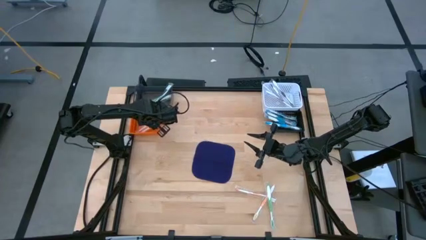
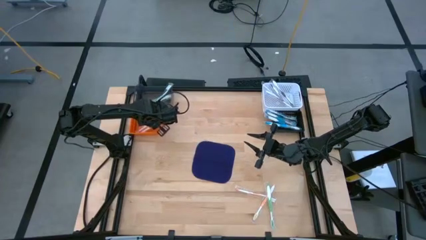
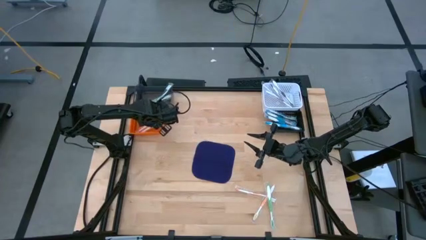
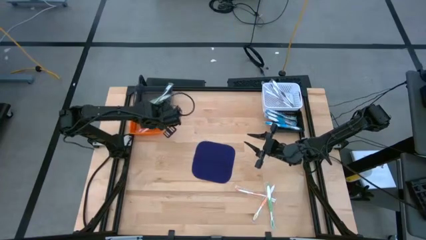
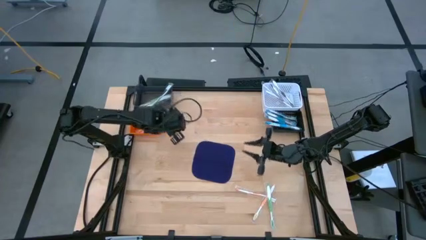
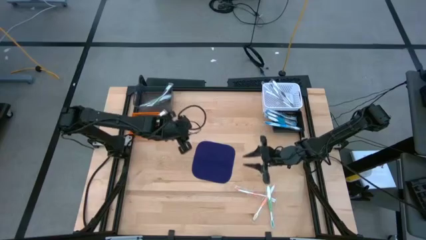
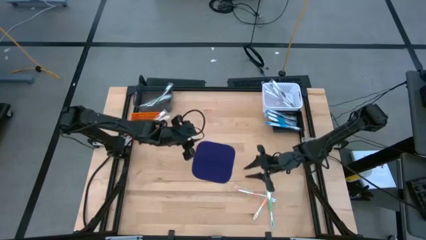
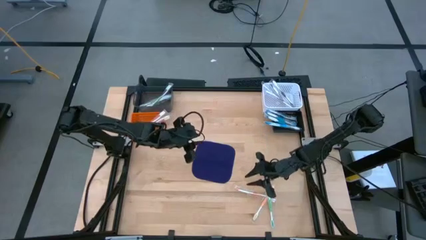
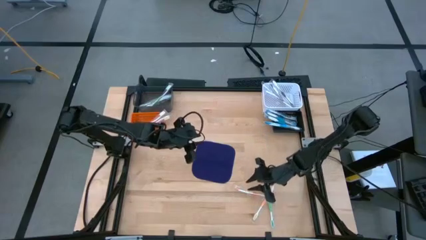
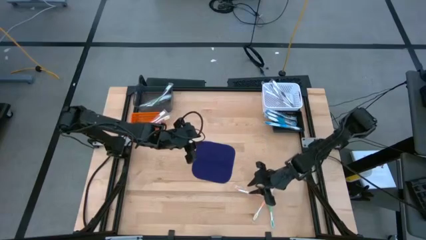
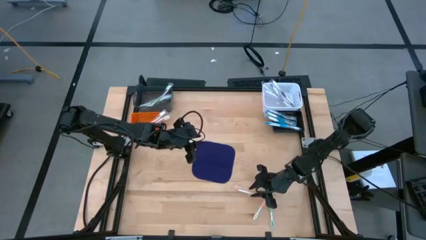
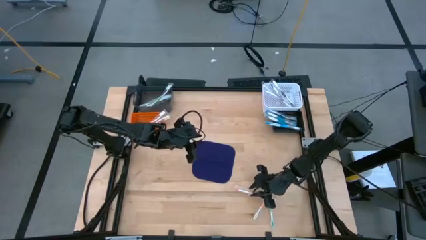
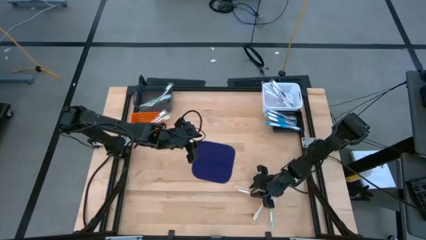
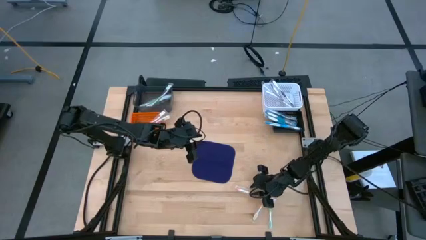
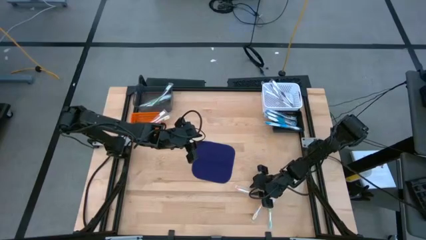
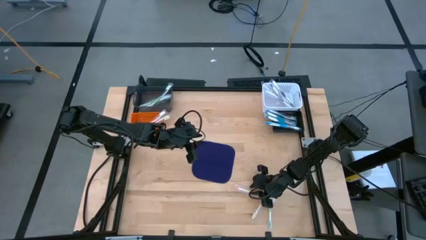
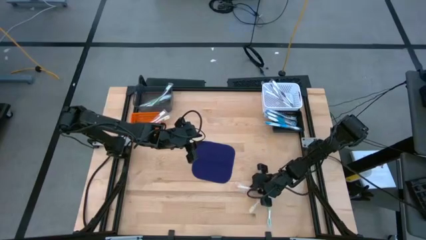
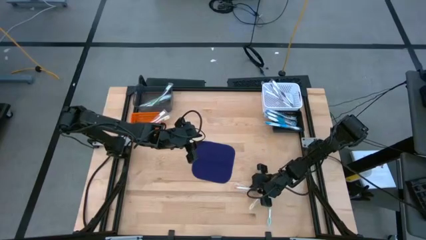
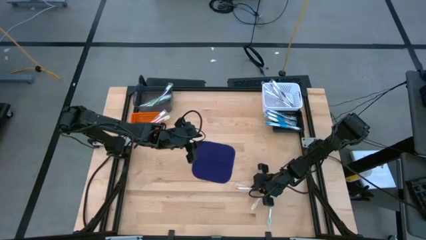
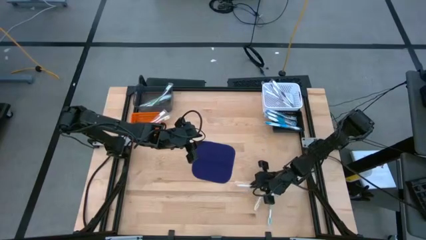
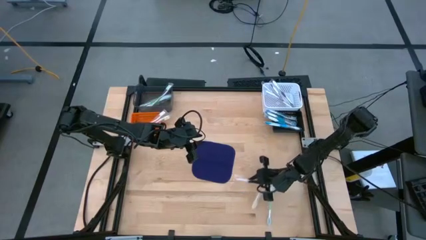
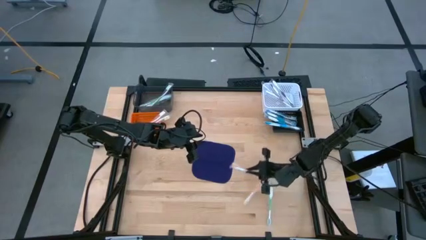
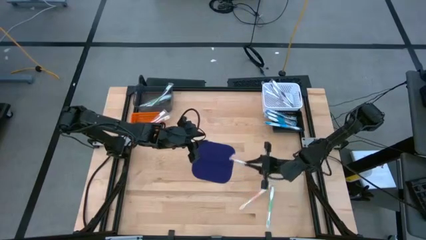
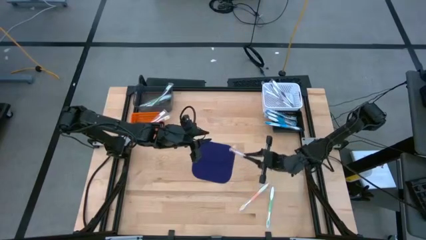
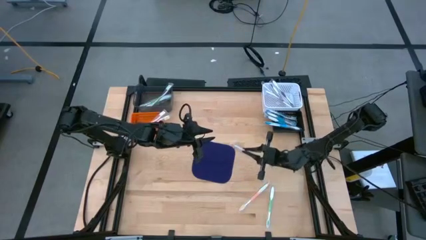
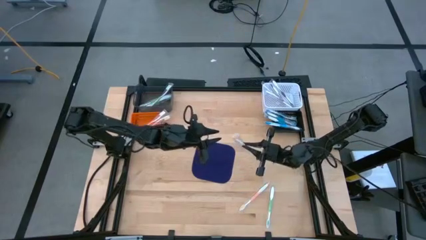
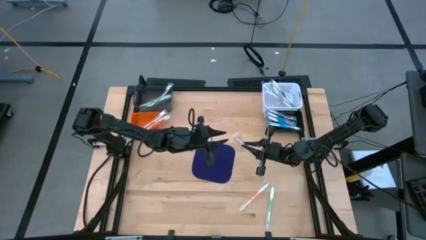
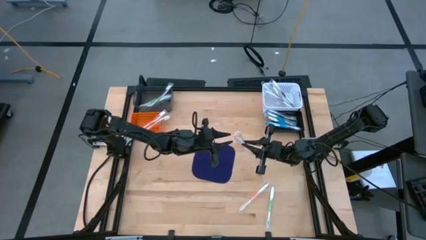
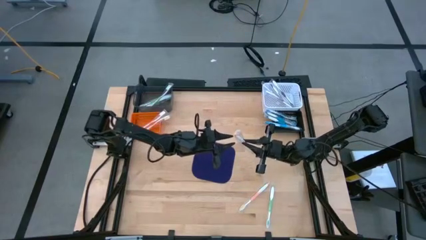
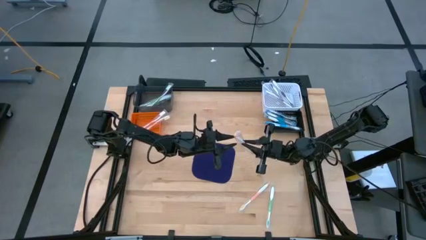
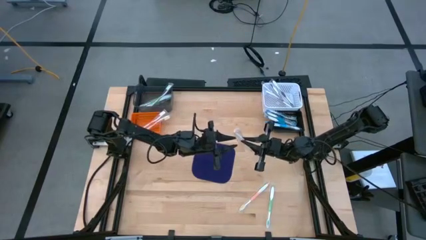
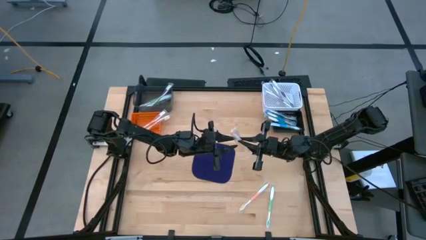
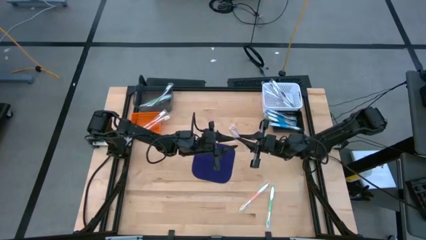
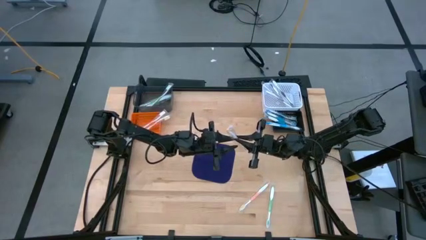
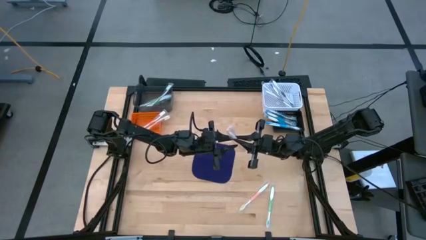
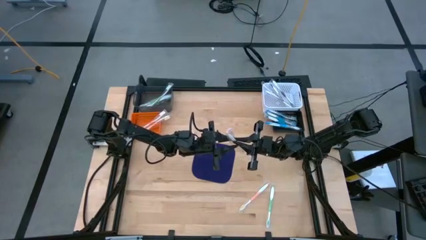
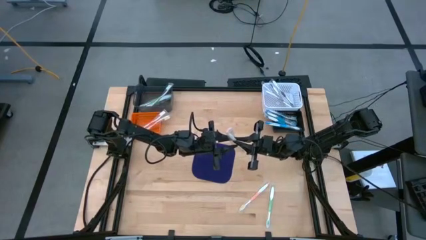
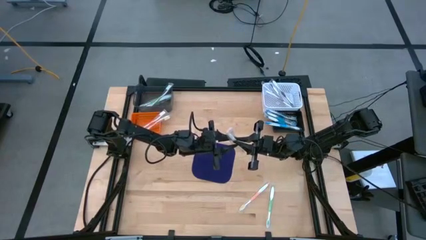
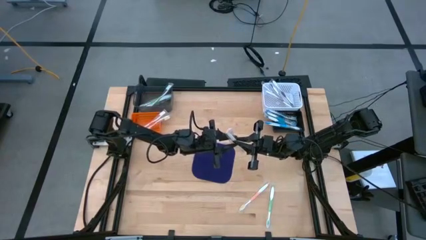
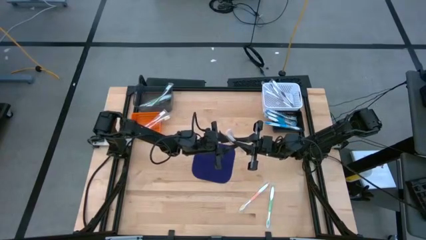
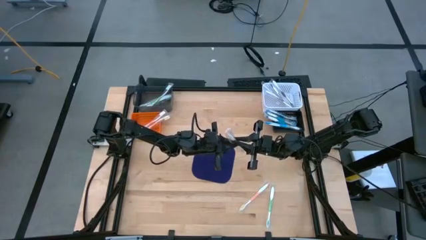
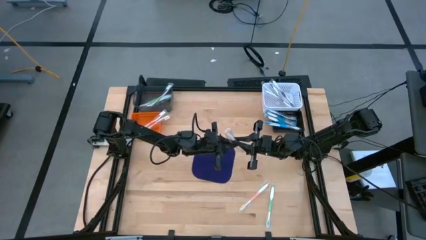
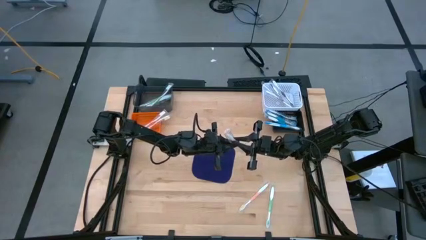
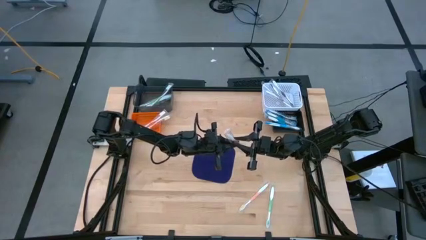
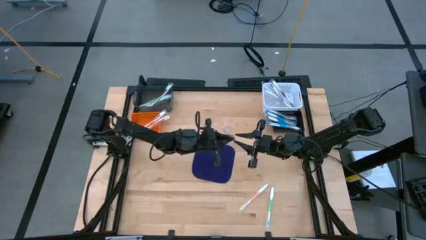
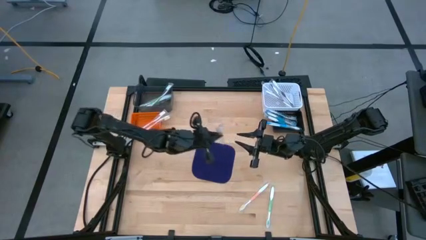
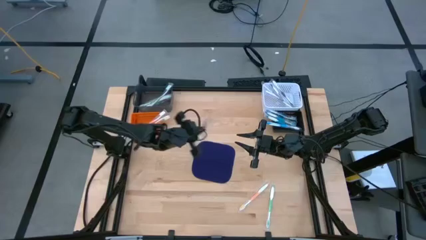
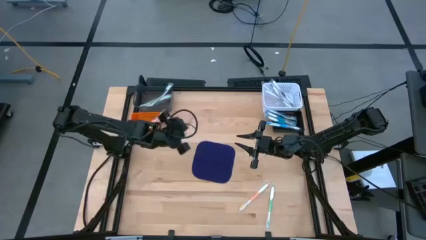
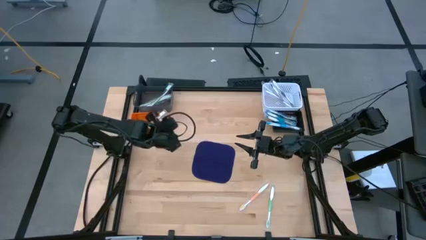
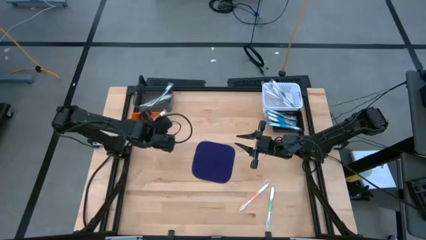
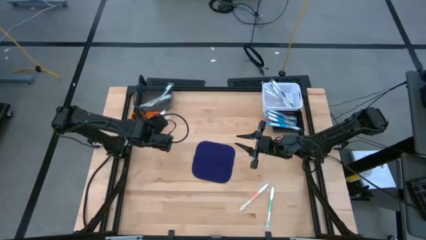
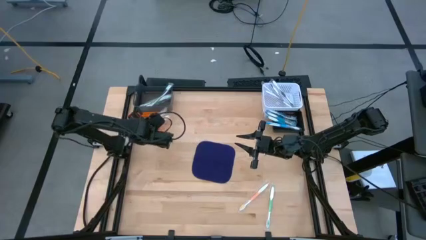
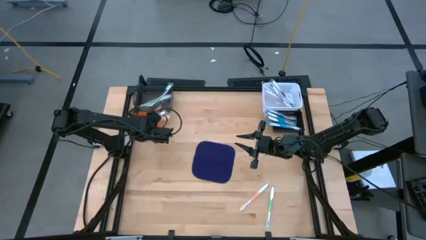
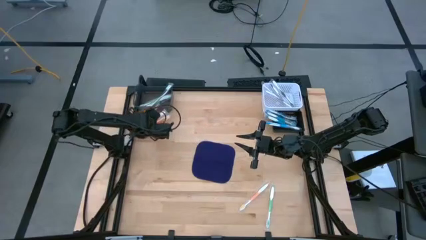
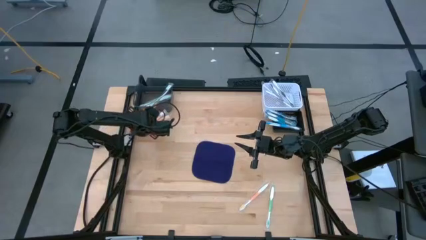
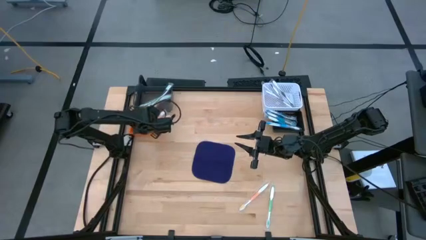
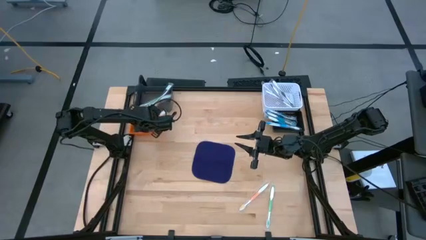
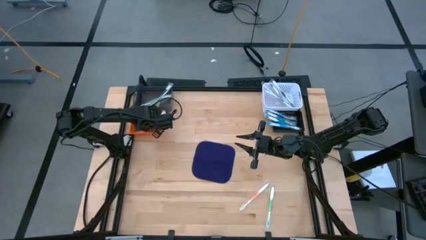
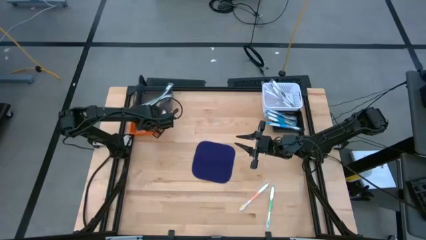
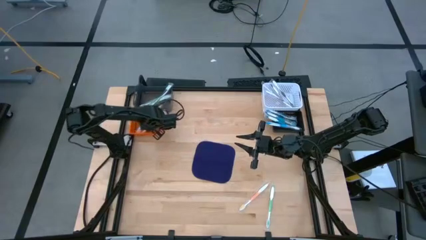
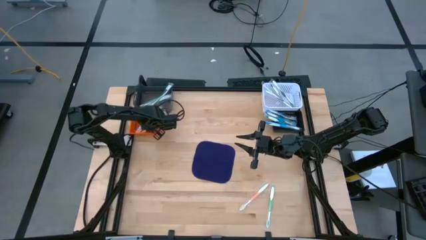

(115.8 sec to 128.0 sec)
Task: Pick & Place Toothbrushes
Put the orange toothbrush into the orange bin

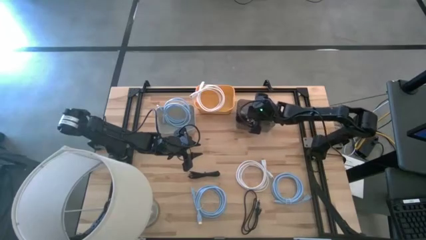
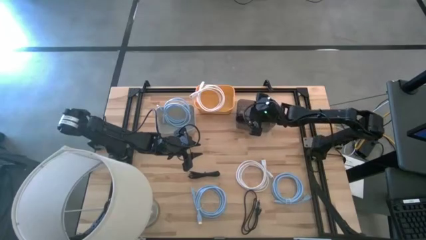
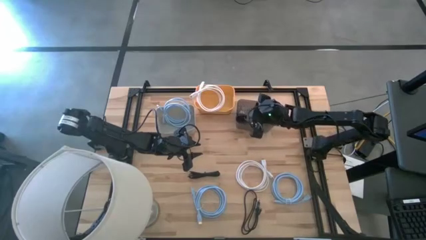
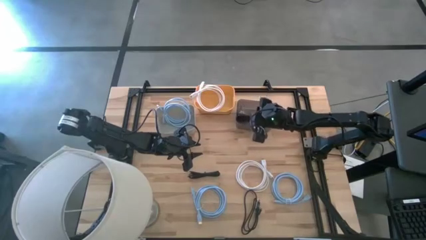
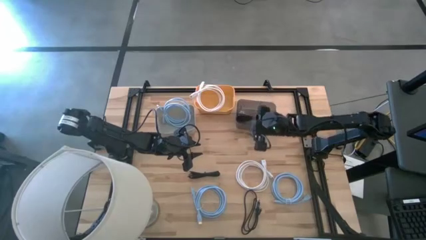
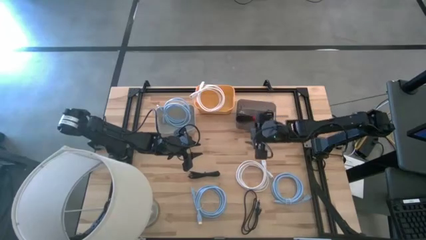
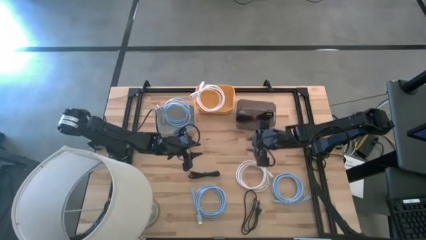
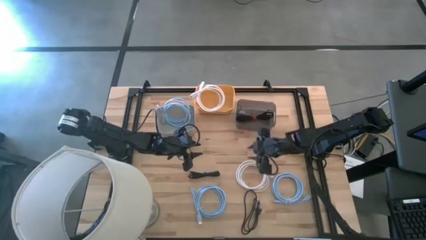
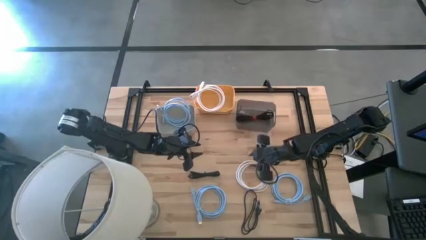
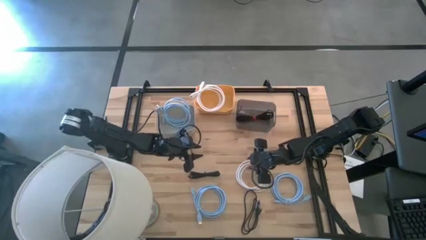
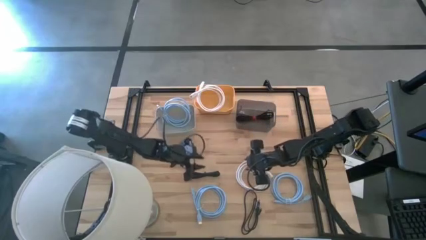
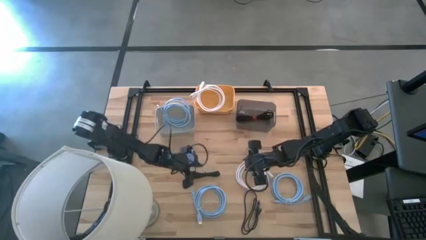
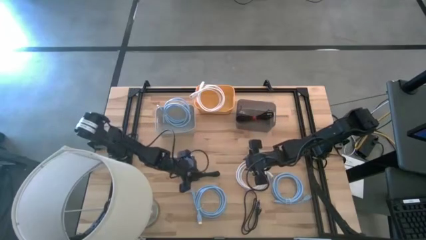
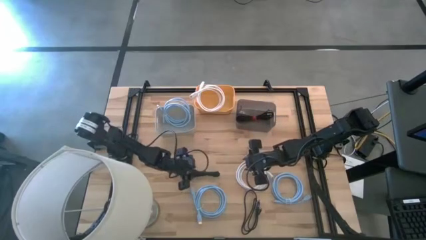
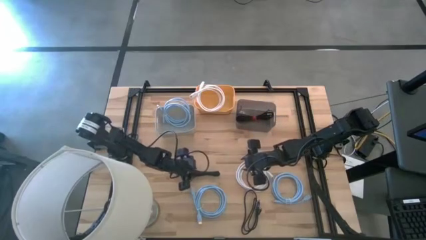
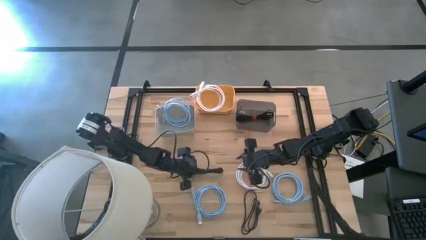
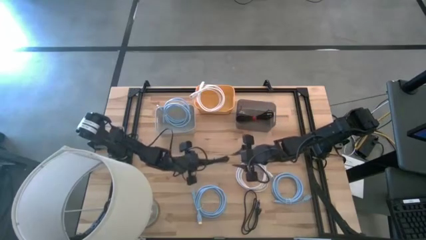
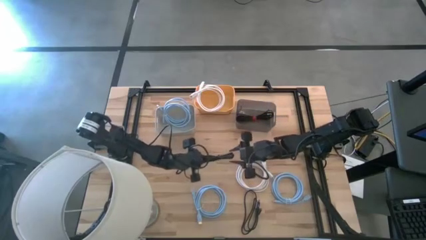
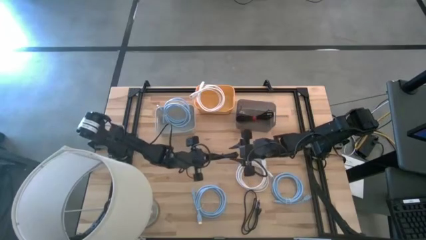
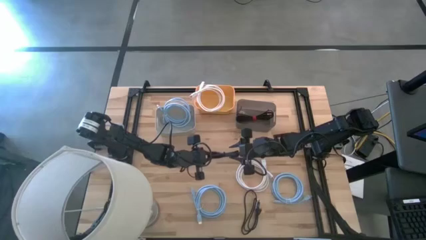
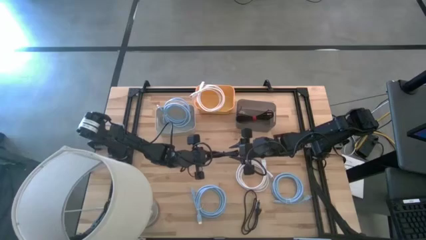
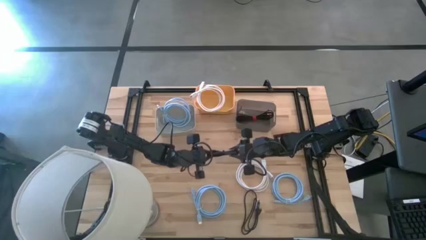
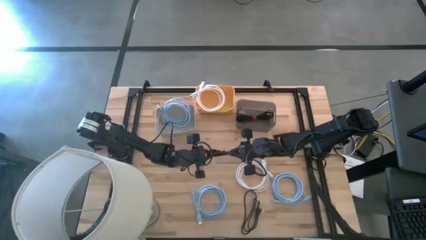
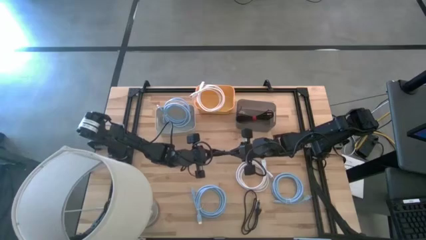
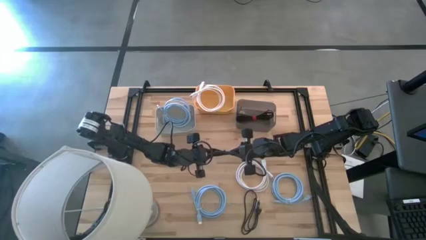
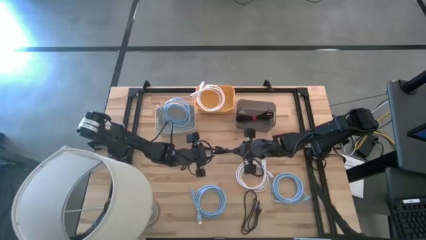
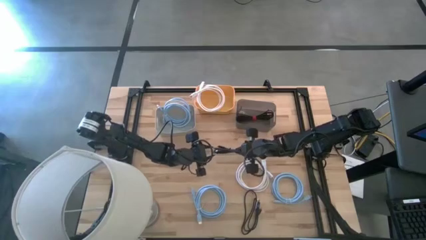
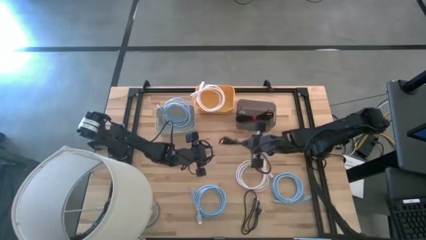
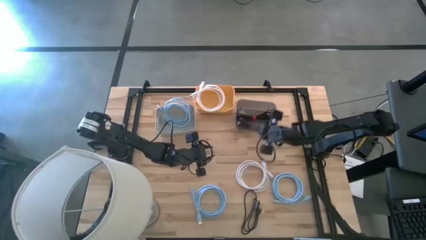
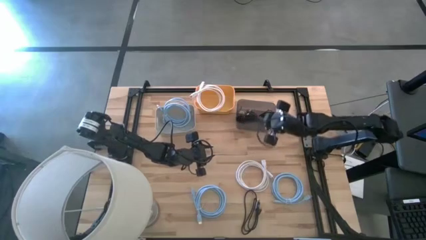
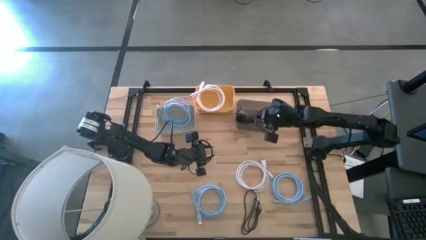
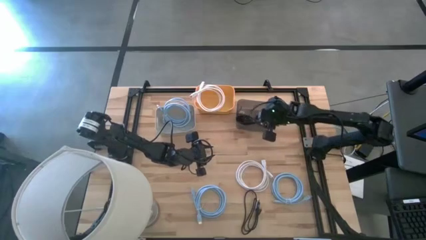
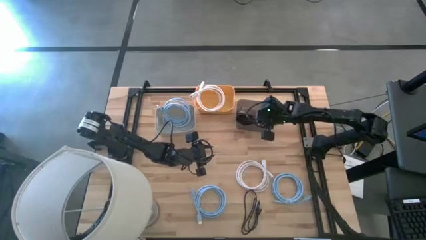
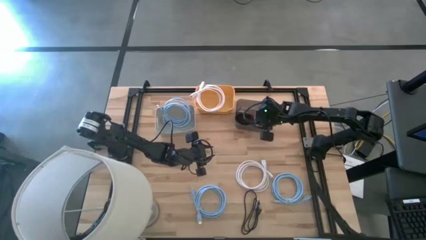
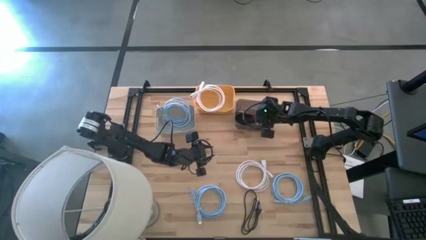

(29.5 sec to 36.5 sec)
Task: Pick & Place USB Port
Put the top black charger cable into the black bin
